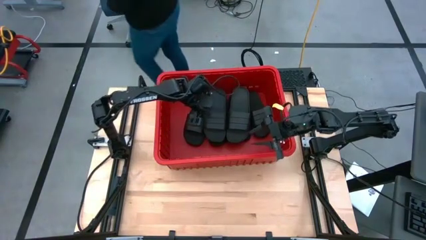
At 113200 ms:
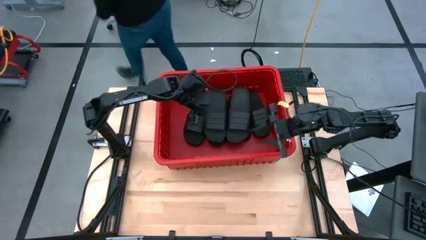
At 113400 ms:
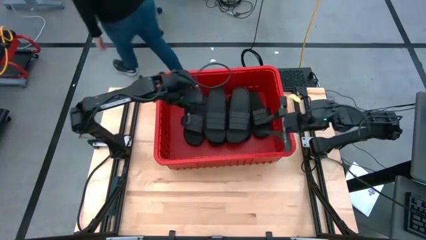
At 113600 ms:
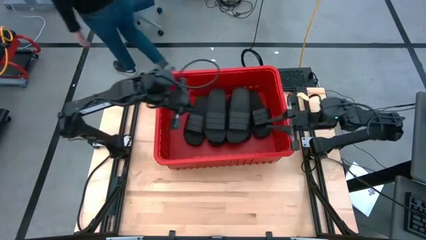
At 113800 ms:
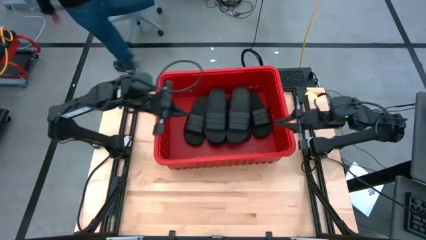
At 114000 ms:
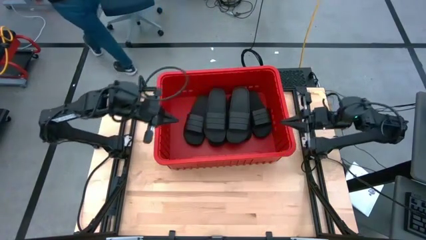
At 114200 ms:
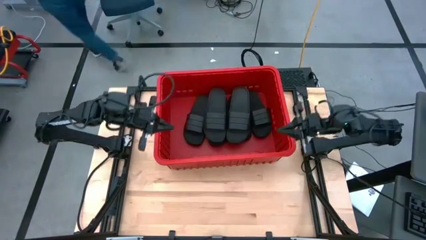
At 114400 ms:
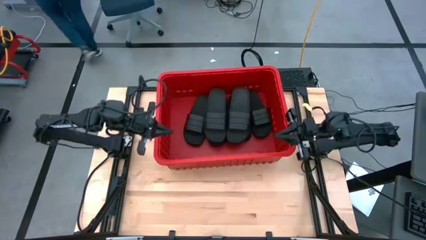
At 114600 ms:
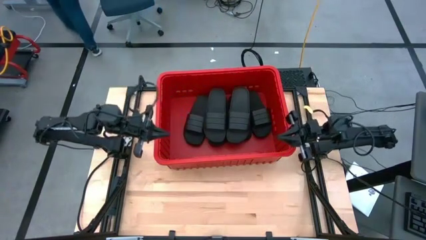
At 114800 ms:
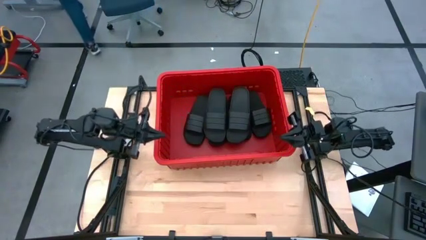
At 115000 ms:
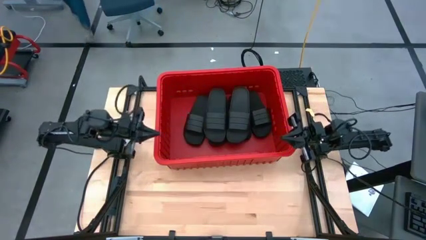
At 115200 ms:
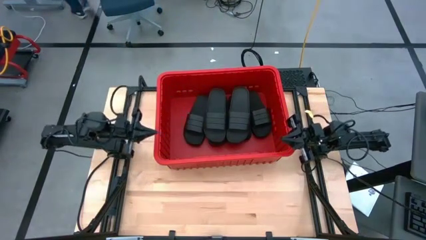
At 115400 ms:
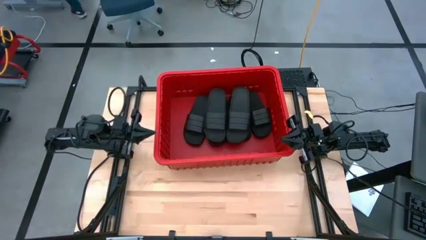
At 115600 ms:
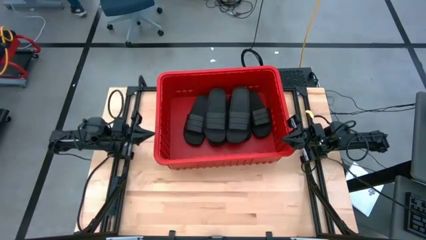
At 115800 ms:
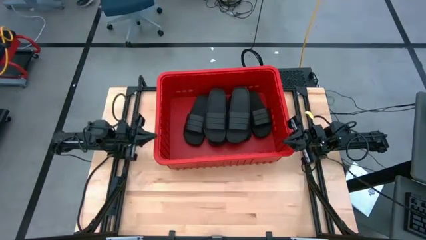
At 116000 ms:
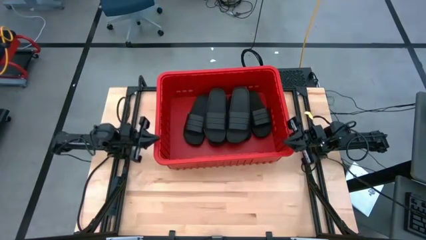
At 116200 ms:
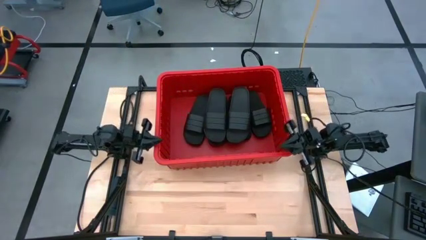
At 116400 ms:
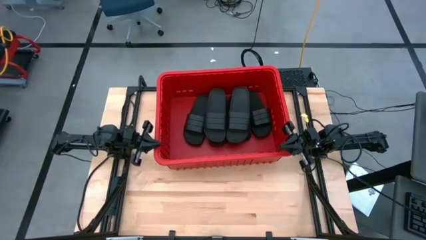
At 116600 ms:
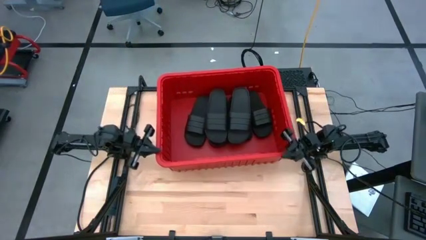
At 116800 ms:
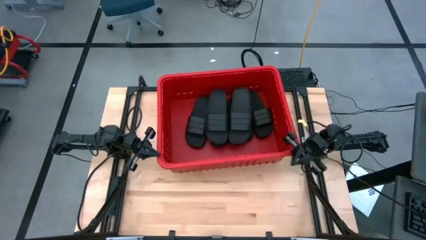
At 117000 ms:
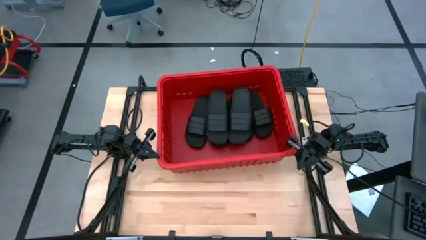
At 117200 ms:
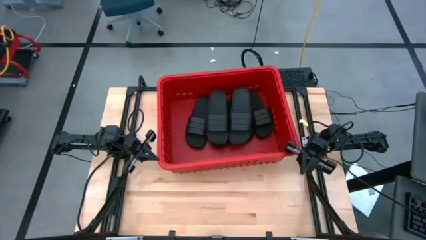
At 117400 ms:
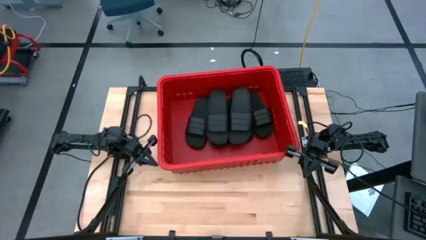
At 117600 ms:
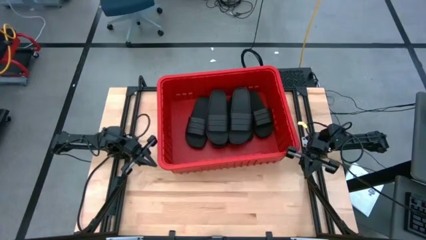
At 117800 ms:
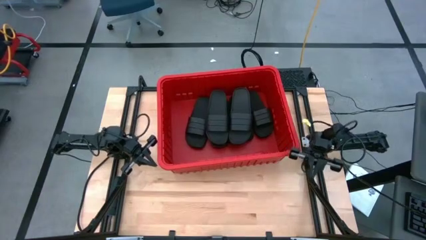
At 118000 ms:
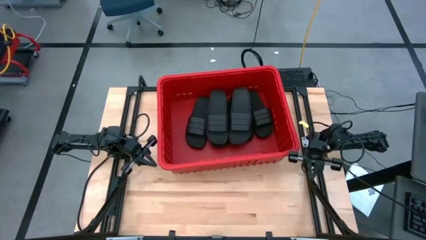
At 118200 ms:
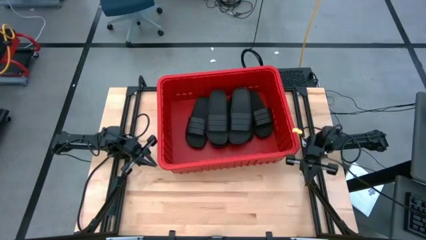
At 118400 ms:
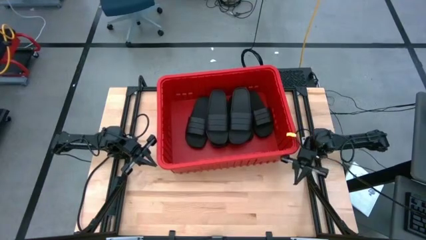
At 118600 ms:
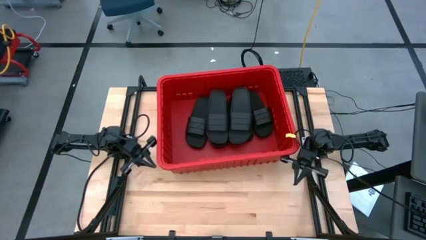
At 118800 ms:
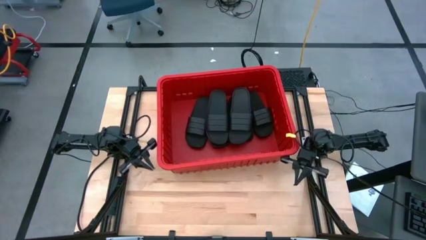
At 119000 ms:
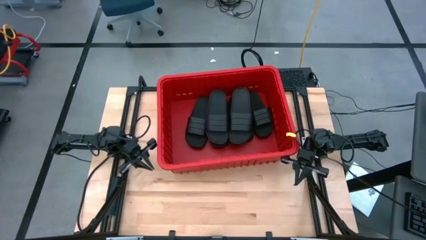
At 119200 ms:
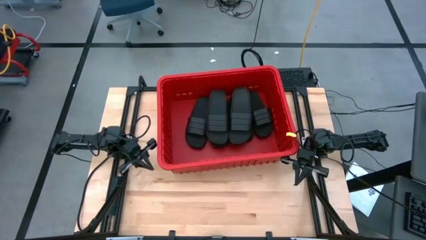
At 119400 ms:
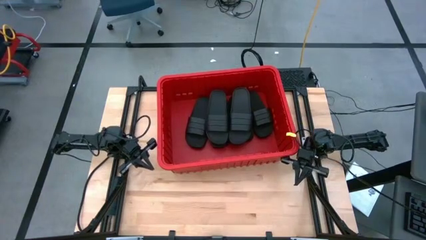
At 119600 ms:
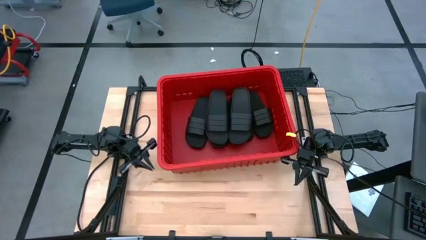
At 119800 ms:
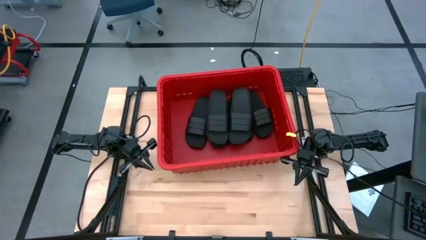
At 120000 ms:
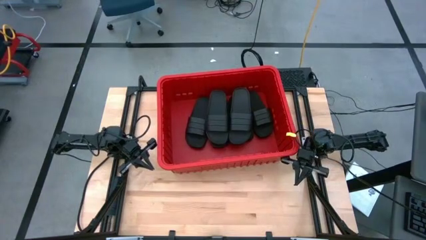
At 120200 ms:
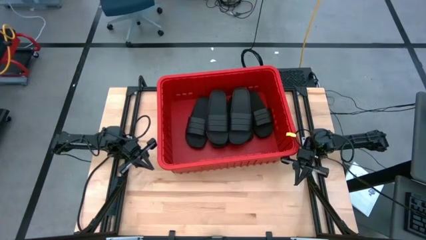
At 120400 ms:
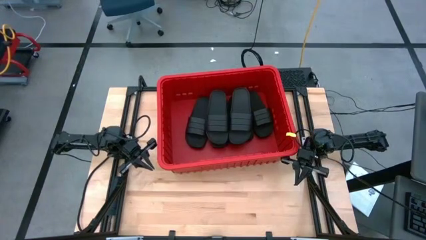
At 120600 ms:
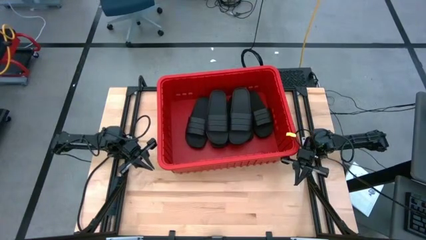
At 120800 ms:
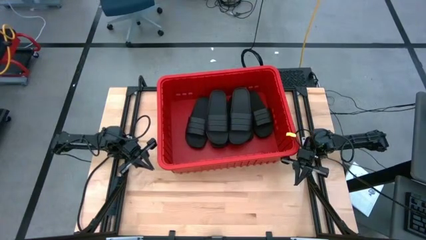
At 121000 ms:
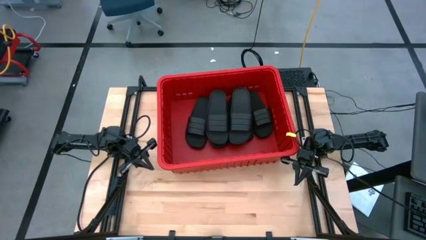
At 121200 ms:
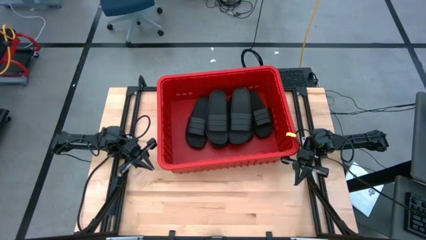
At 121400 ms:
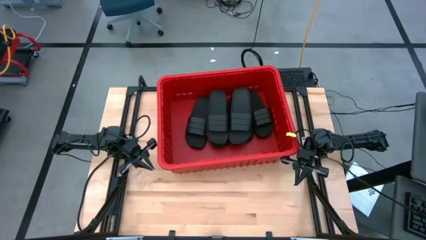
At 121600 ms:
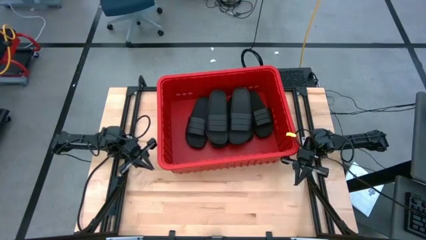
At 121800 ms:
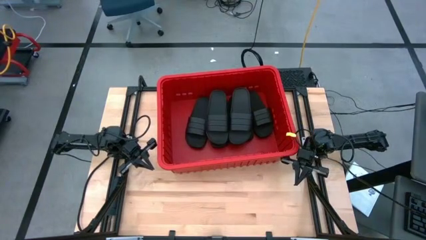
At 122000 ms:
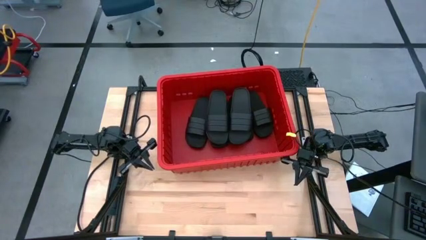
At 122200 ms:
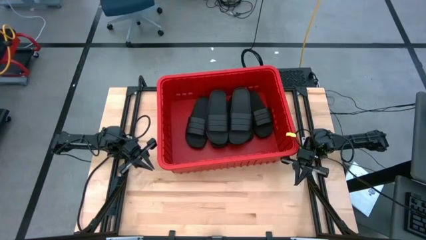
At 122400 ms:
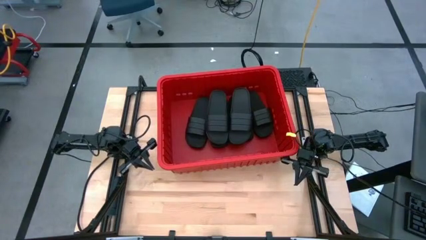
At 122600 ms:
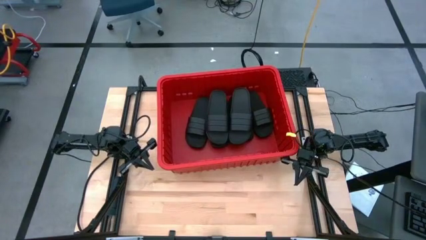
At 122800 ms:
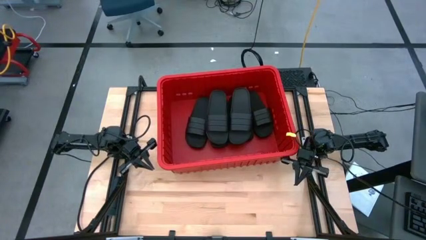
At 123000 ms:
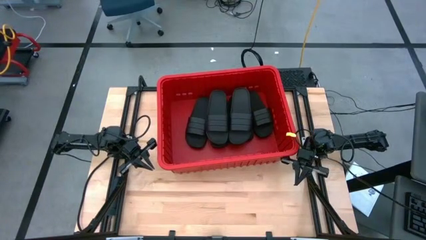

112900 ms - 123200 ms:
Task: Pick and place slides into bin
Return to Home Position
